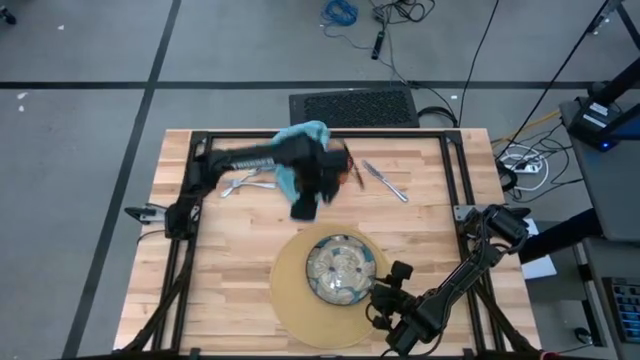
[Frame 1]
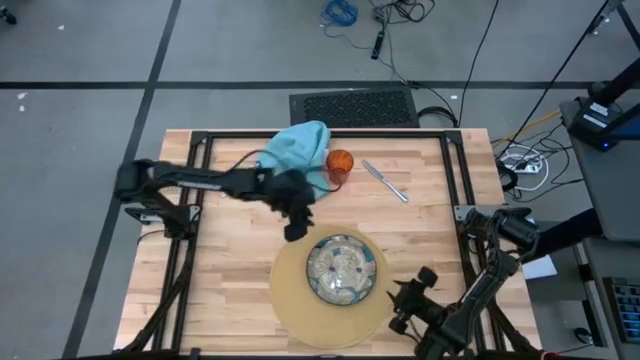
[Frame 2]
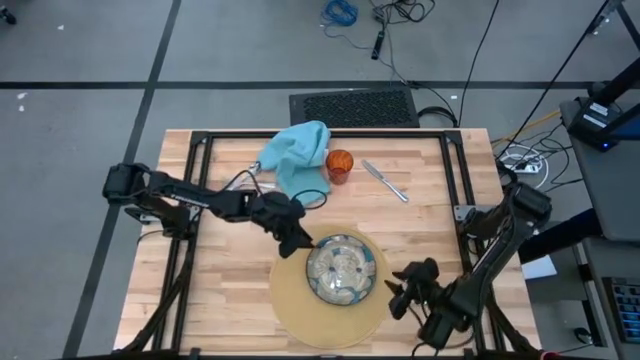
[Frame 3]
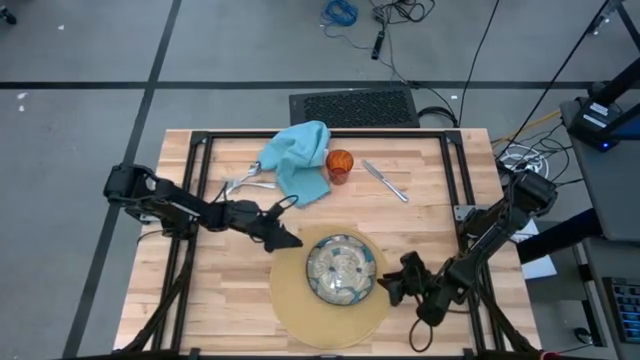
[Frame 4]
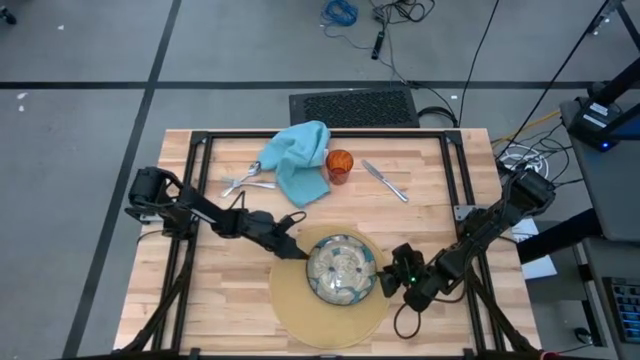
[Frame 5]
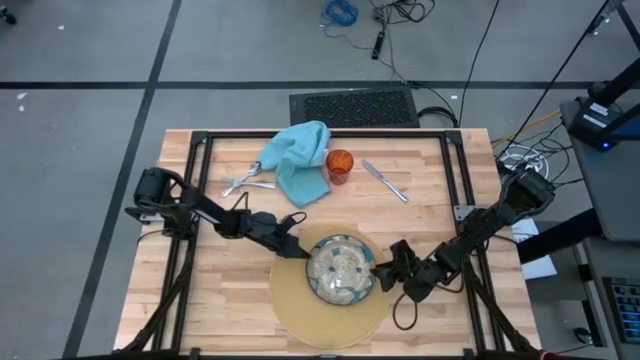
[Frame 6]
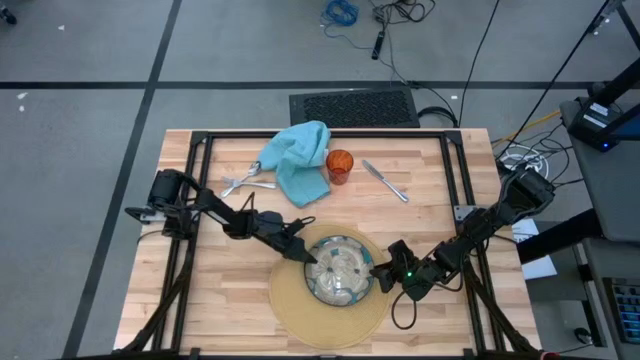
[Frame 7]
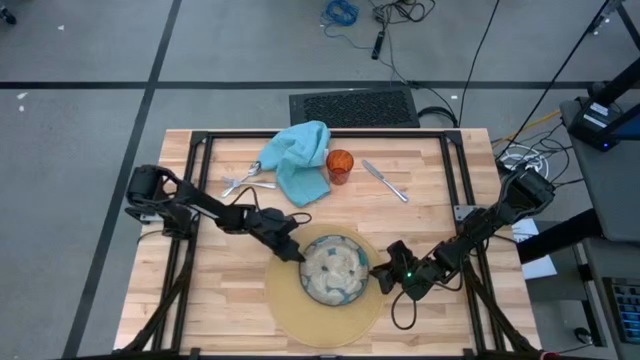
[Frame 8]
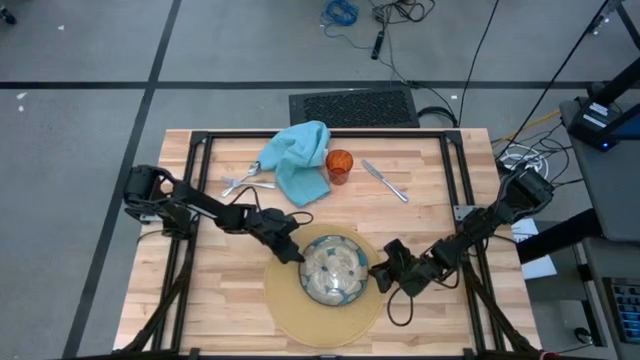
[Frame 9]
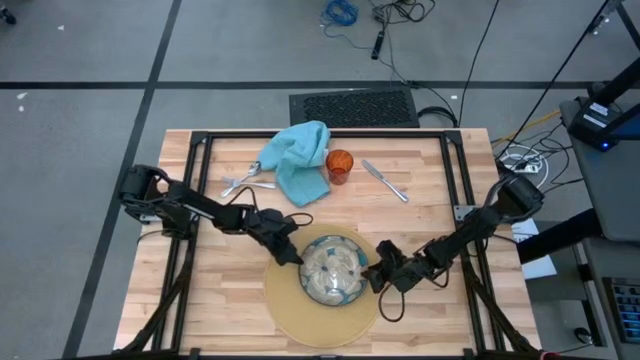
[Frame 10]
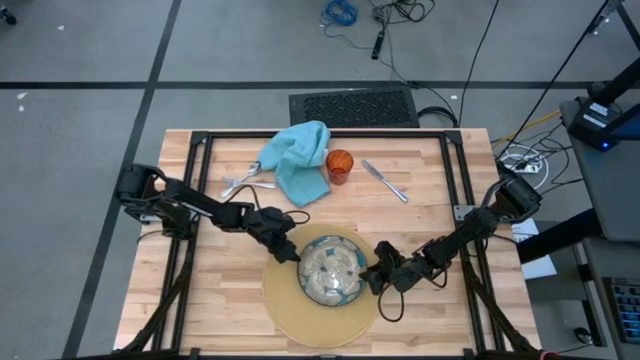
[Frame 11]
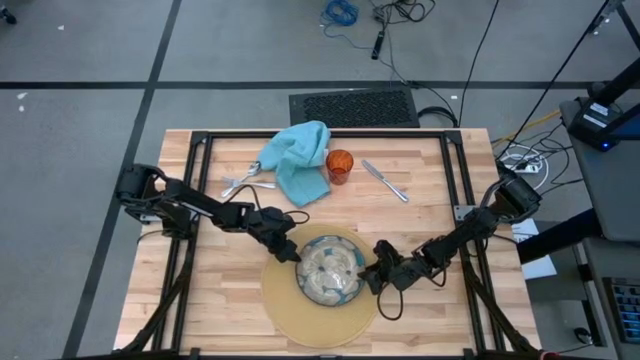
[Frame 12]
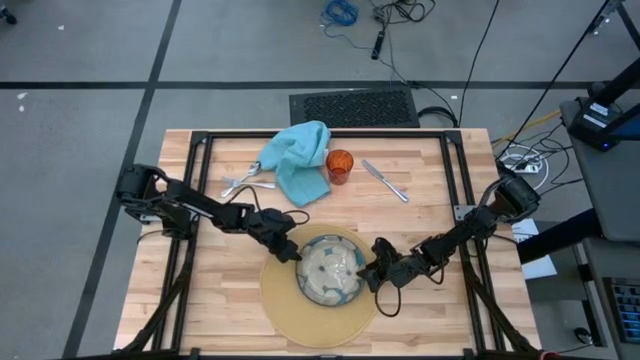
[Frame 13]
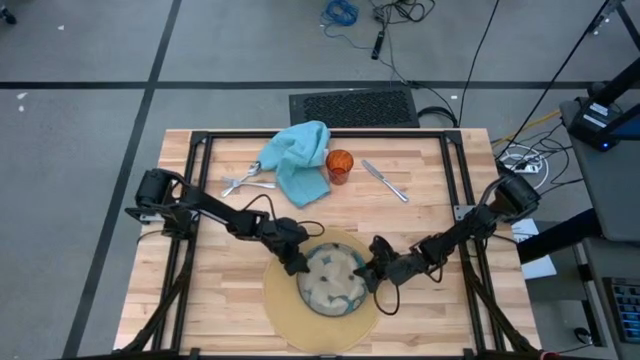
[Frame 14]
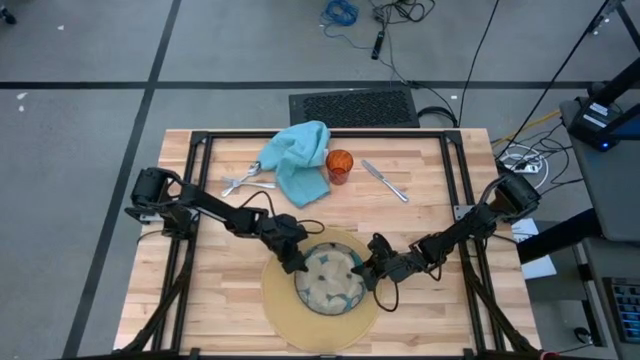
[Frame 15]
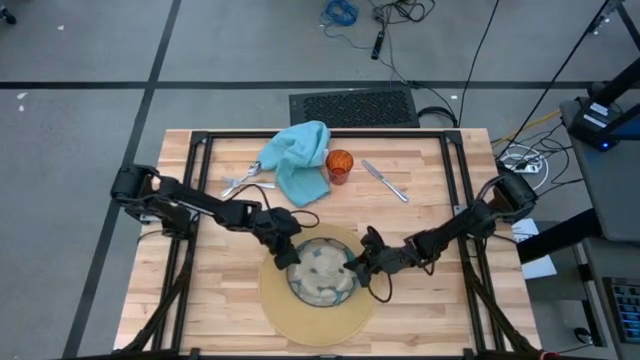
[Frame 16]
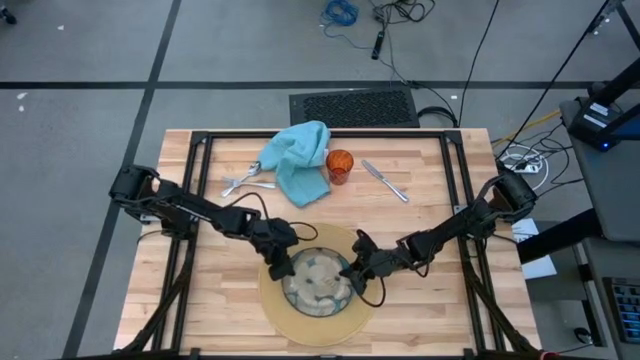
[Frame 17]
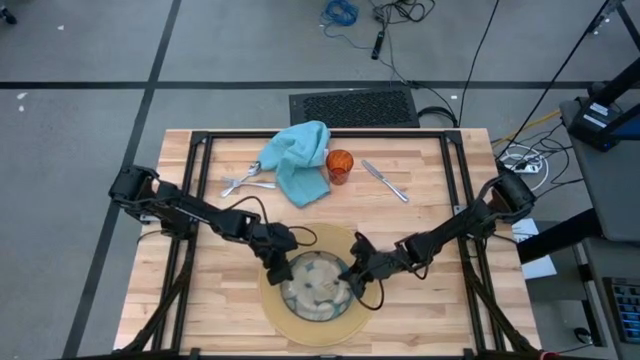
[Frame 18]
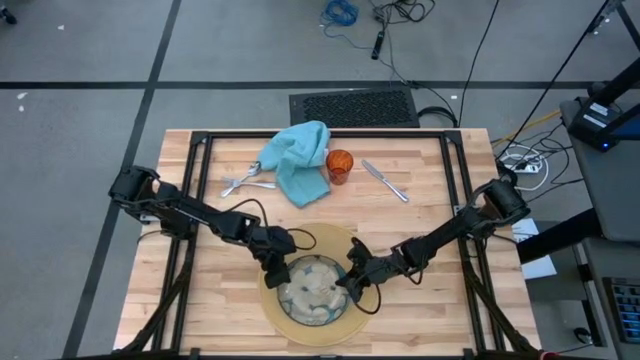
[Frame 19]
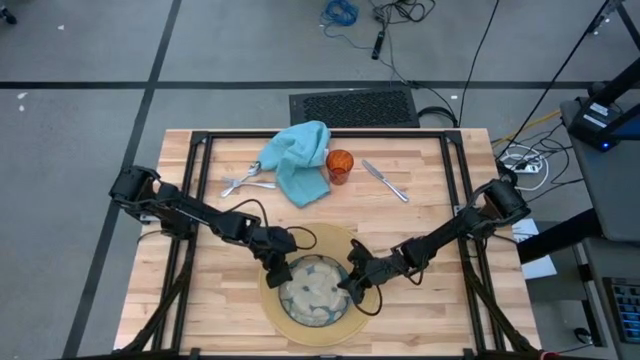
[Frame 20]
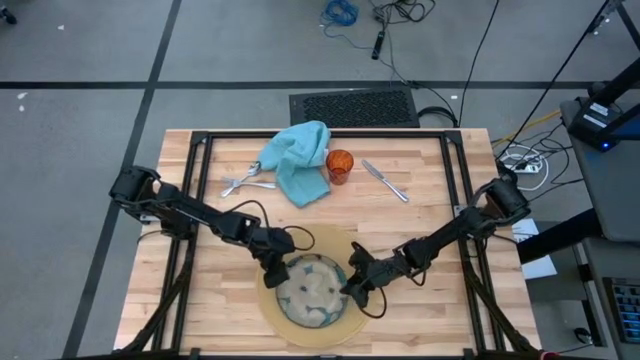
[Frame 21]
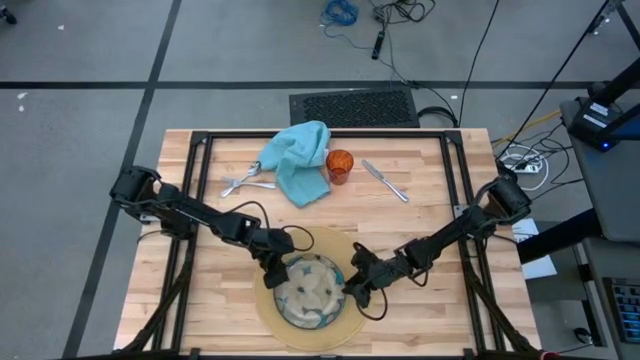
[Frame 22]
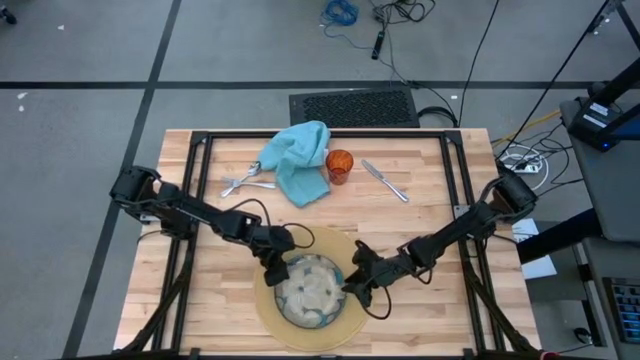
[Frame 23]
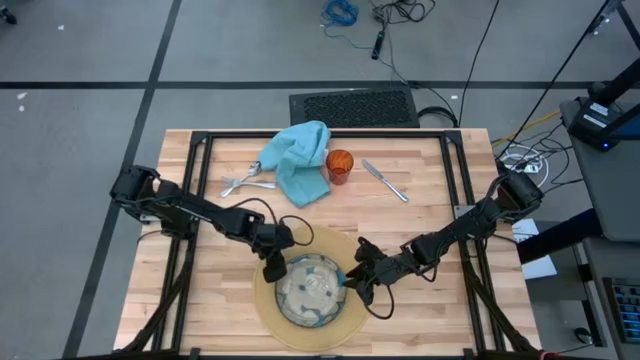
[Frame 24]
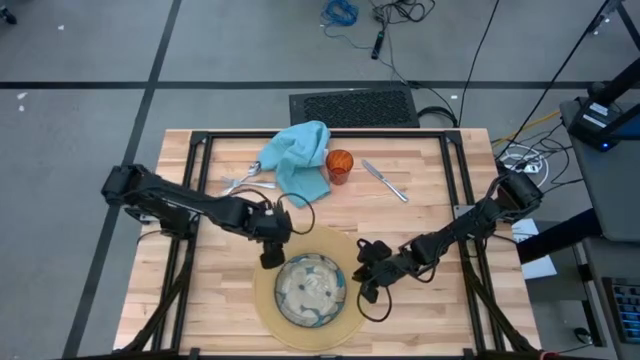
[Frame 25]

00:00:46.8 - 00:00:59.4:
Task: Set table place
Adjust the pattern plate on the brown placemat

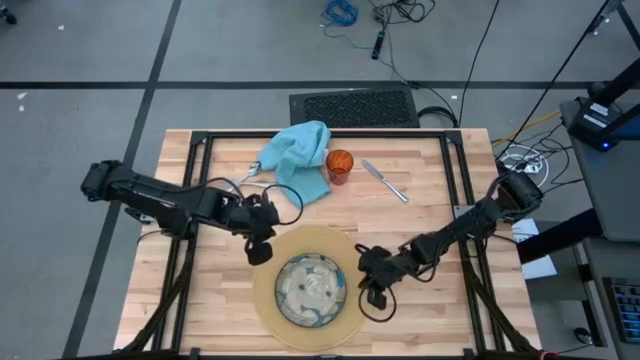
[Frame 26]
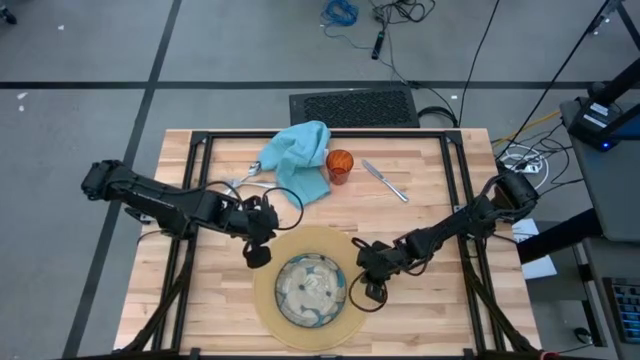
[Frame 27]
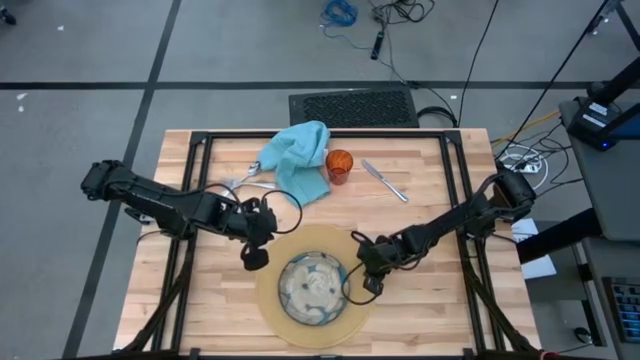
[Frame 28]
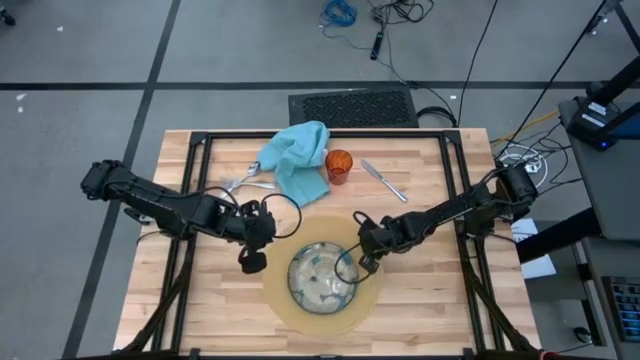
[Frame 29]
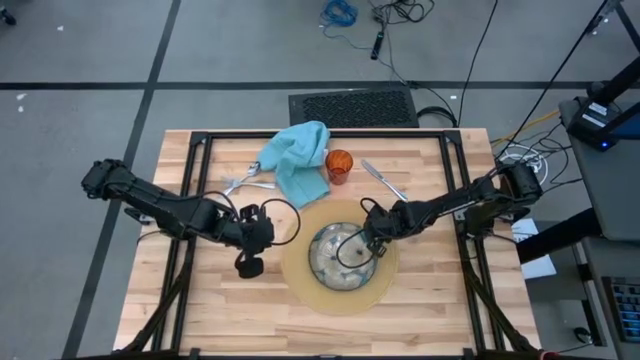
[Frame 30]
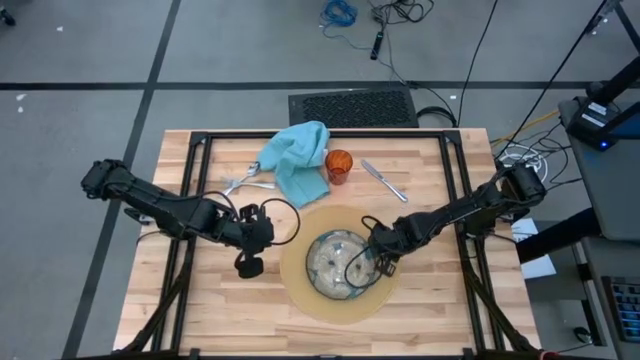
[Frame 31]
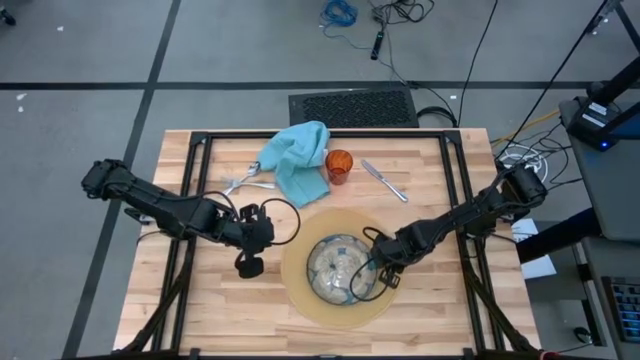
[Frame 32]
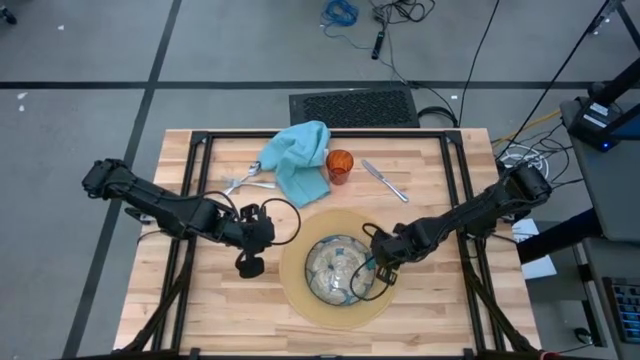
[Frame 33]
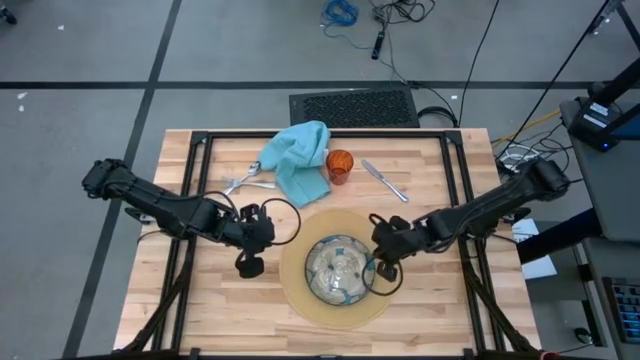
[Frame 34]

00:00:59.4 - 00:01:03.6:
Adjust the brown placemat

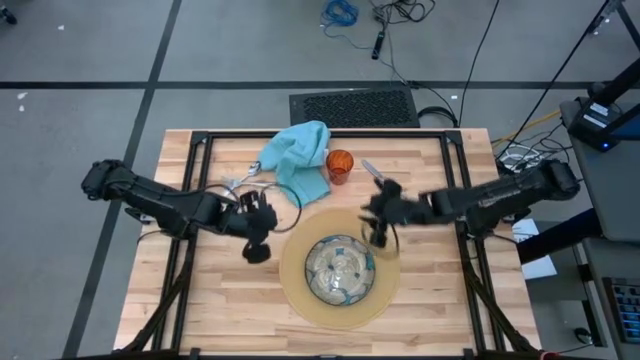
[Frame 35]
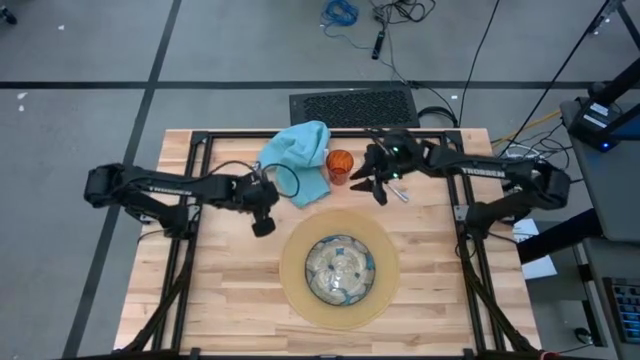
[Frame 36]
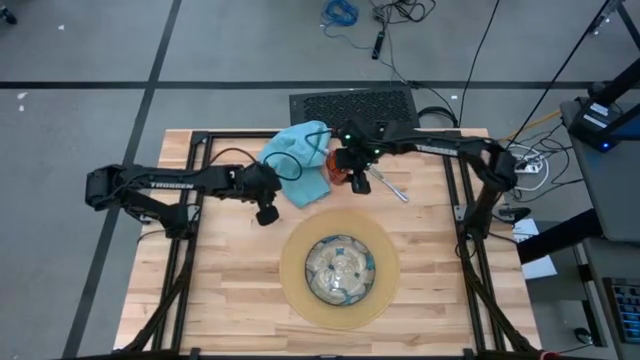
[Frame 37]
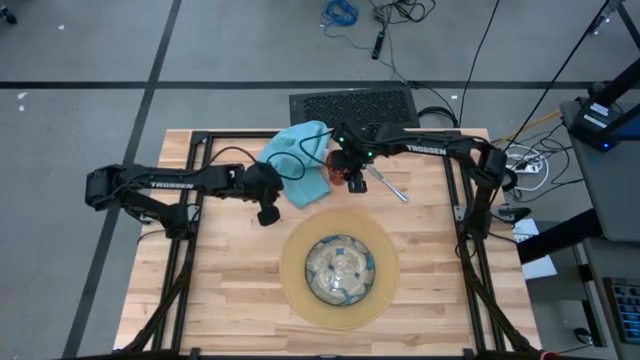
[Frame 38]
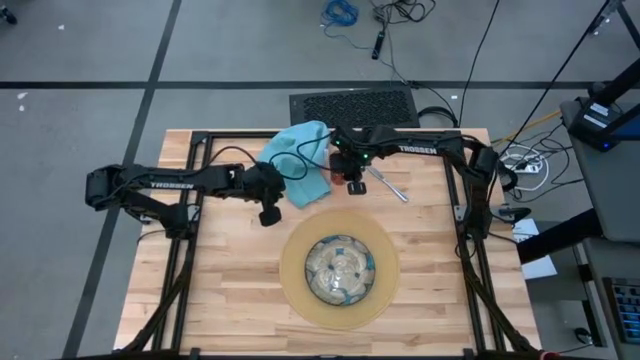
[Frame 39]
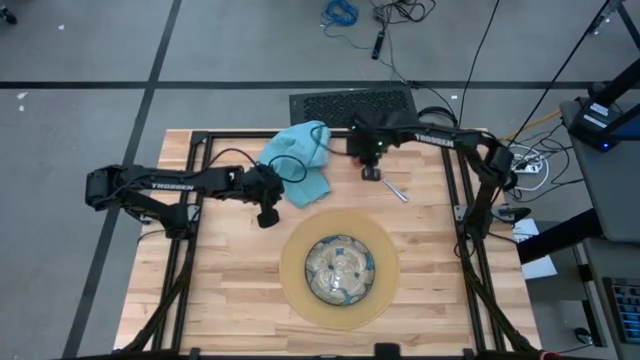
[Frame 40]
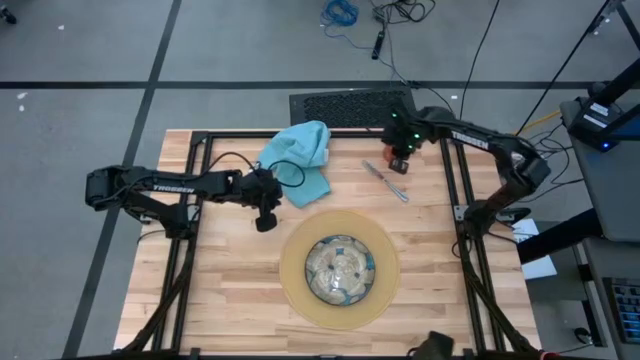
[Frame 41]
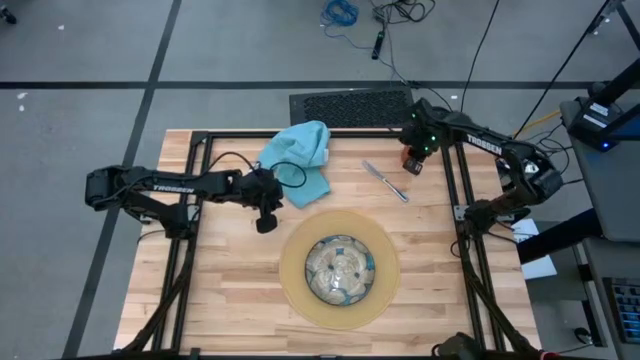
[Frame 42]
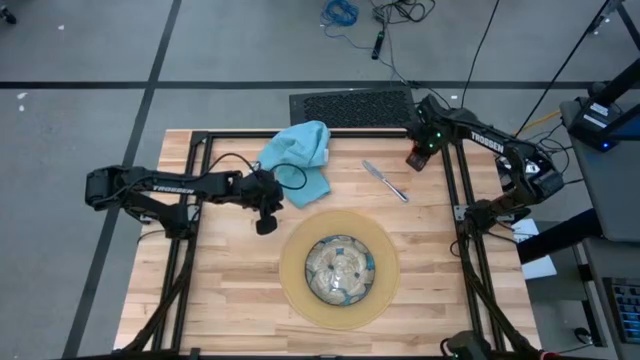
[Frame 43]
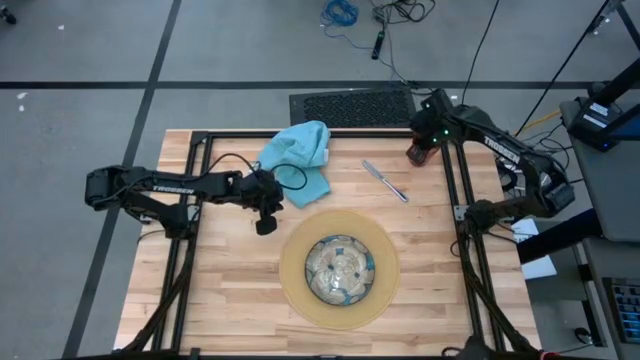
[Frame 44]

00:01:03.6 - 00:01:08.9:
Move the brown cup to the top right of the table
